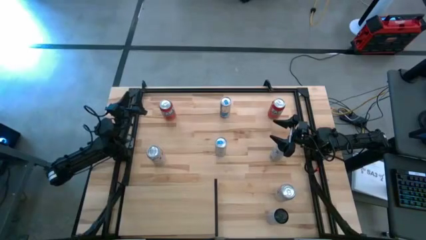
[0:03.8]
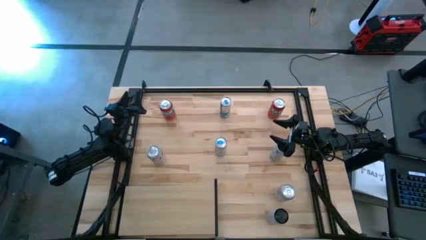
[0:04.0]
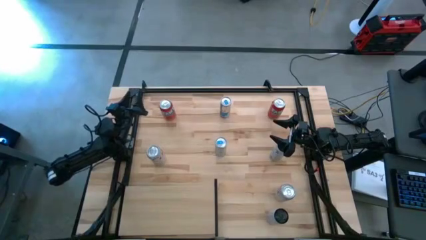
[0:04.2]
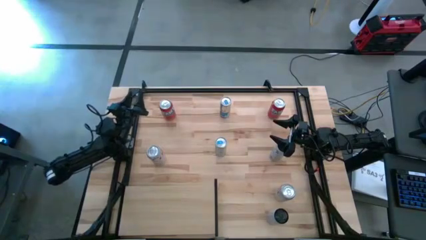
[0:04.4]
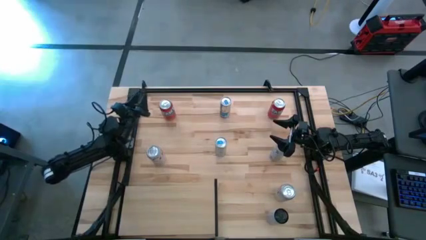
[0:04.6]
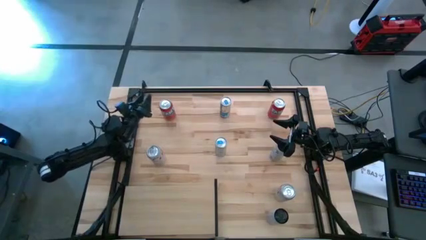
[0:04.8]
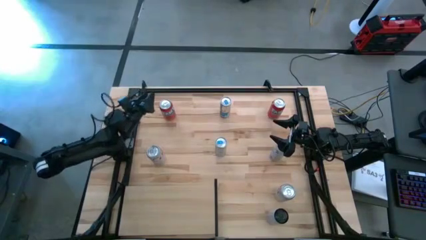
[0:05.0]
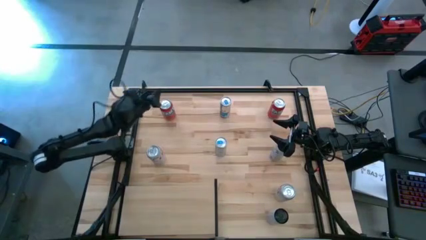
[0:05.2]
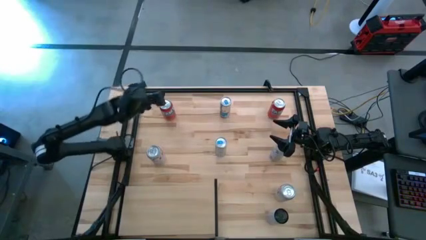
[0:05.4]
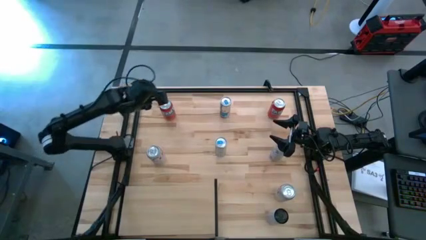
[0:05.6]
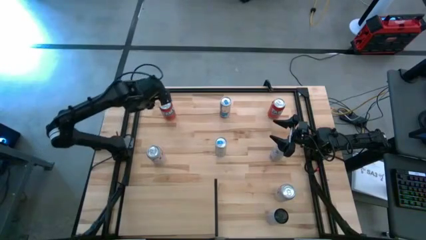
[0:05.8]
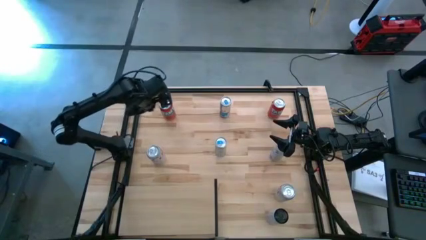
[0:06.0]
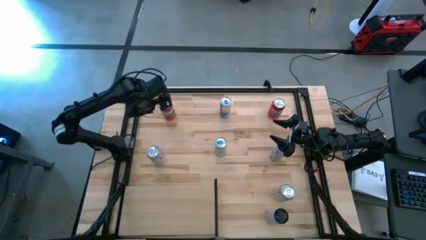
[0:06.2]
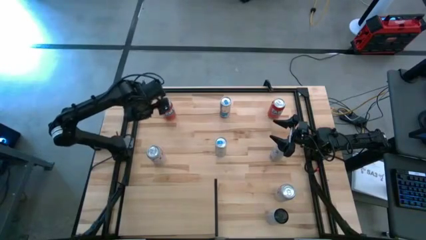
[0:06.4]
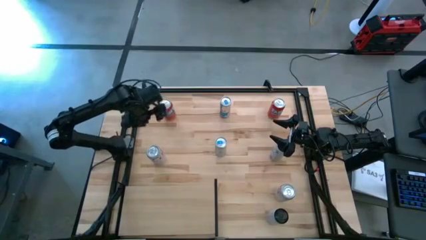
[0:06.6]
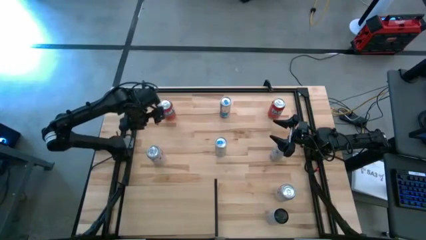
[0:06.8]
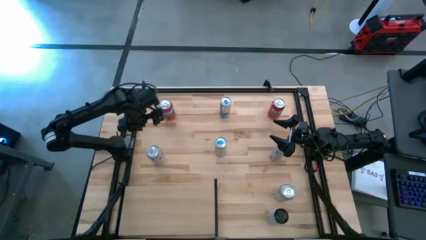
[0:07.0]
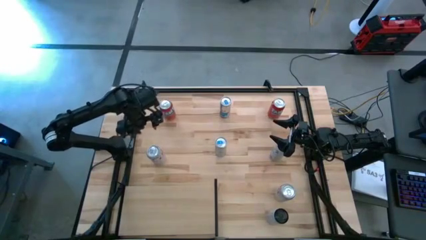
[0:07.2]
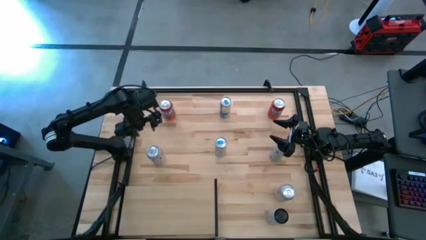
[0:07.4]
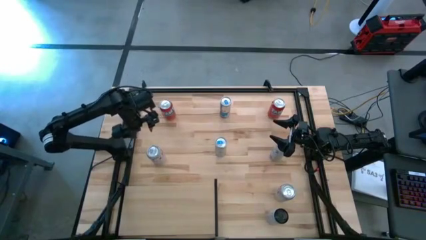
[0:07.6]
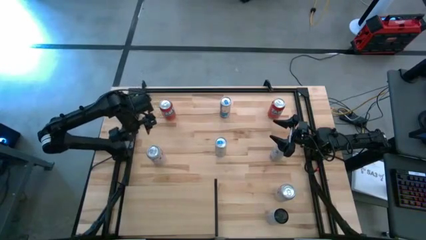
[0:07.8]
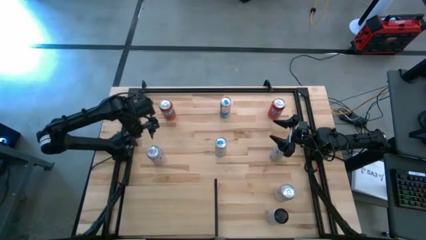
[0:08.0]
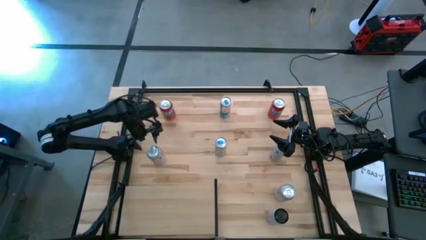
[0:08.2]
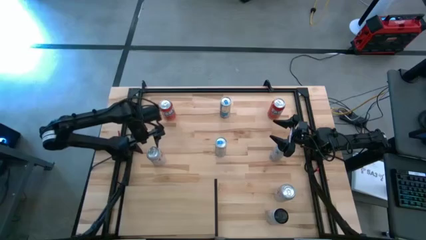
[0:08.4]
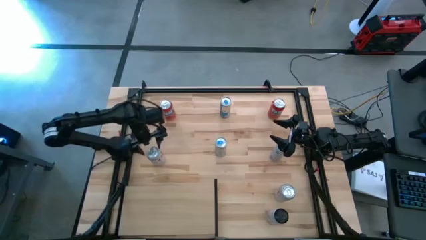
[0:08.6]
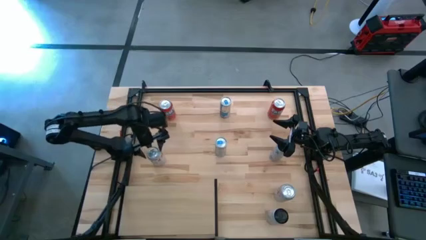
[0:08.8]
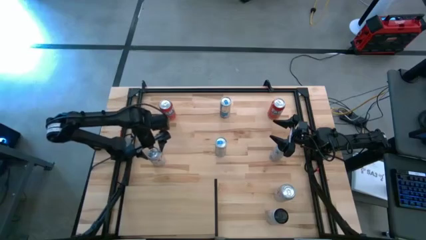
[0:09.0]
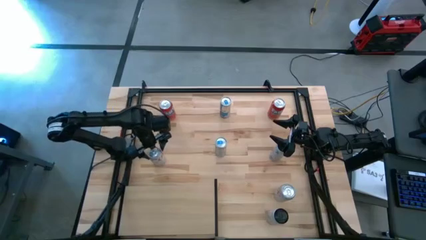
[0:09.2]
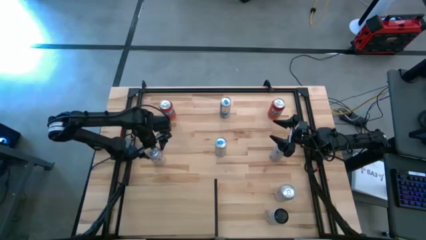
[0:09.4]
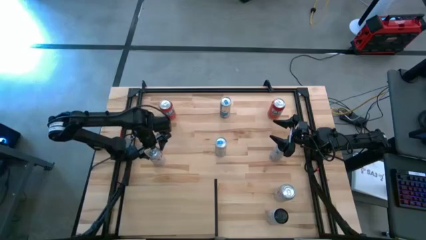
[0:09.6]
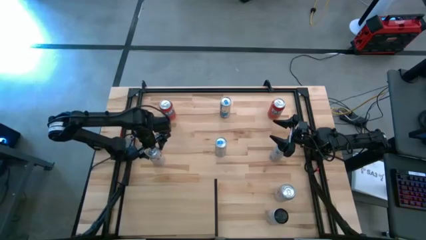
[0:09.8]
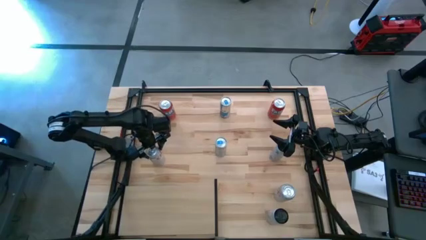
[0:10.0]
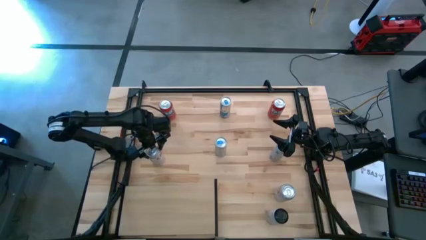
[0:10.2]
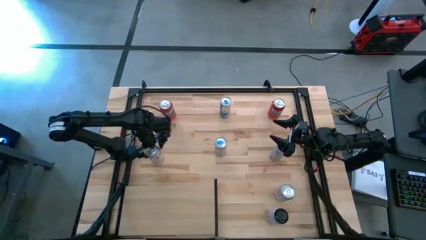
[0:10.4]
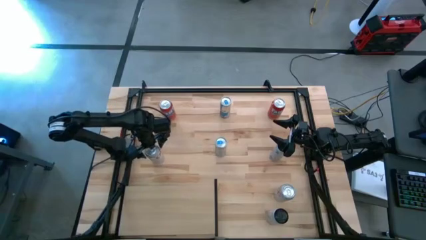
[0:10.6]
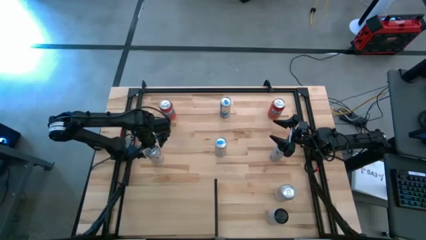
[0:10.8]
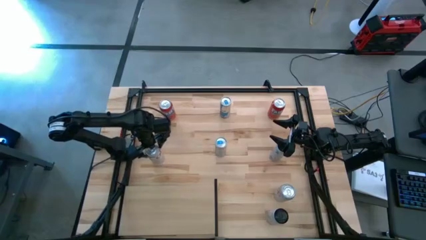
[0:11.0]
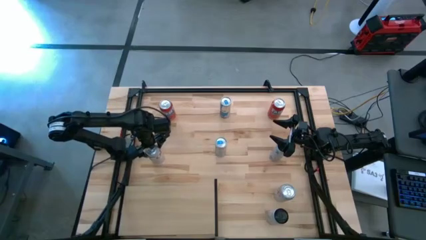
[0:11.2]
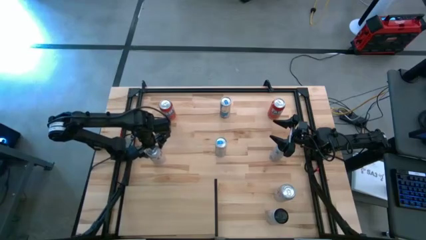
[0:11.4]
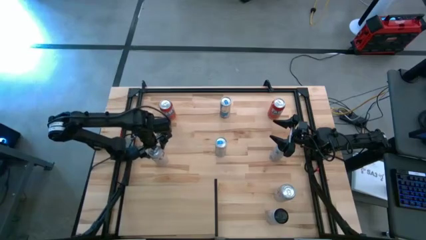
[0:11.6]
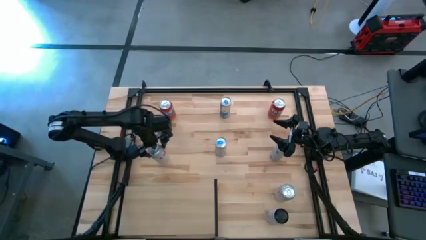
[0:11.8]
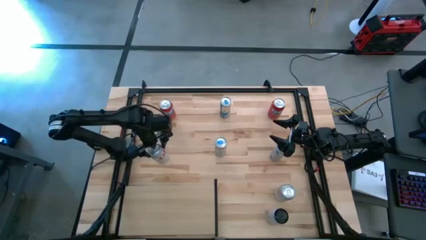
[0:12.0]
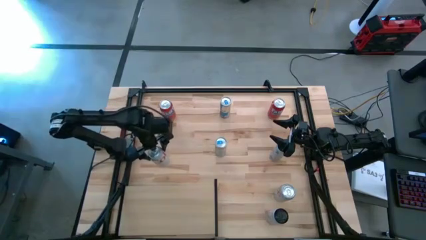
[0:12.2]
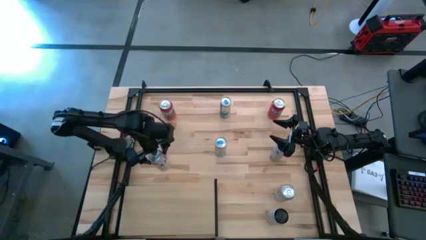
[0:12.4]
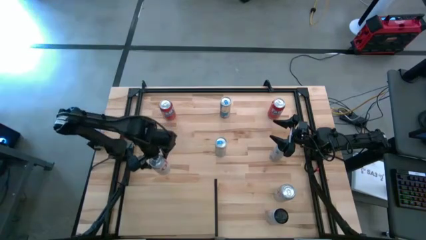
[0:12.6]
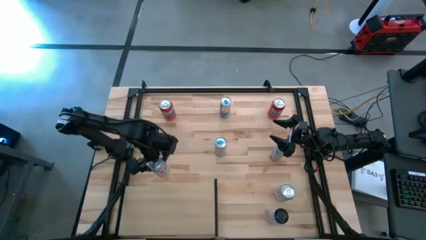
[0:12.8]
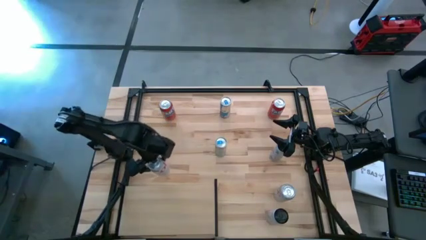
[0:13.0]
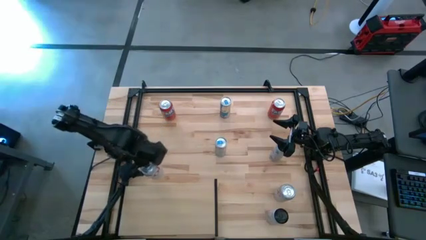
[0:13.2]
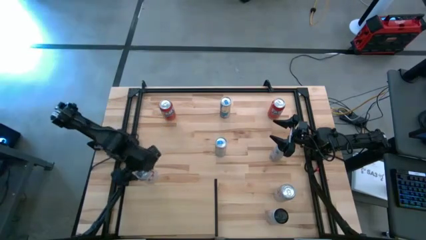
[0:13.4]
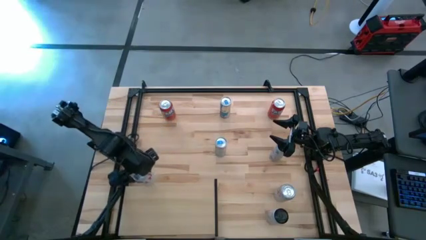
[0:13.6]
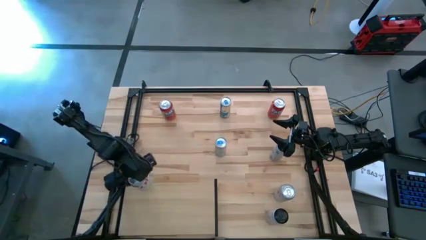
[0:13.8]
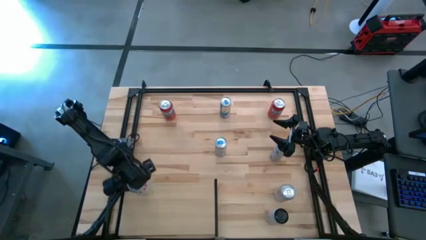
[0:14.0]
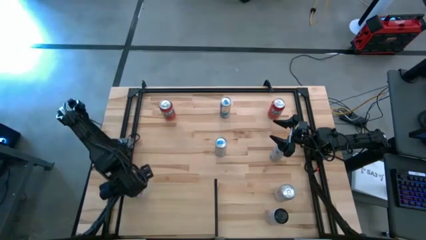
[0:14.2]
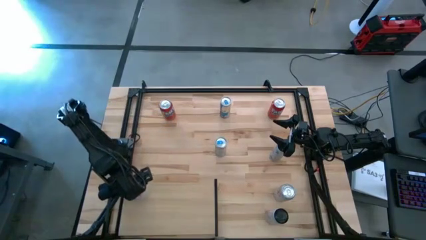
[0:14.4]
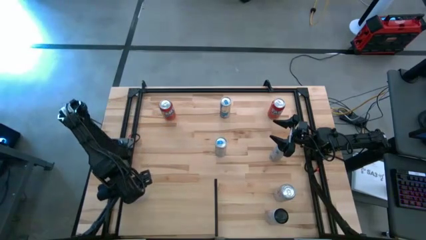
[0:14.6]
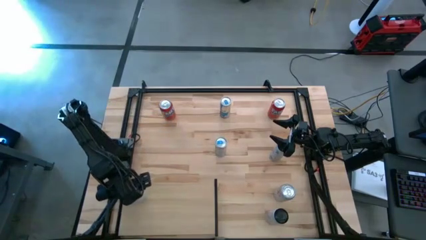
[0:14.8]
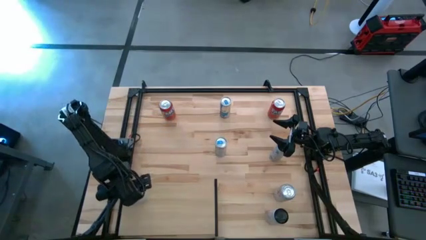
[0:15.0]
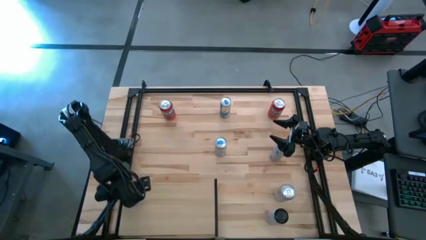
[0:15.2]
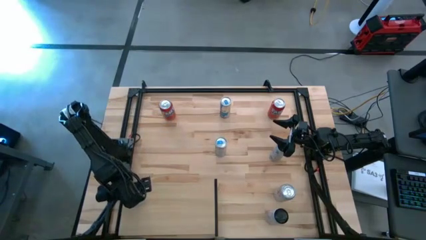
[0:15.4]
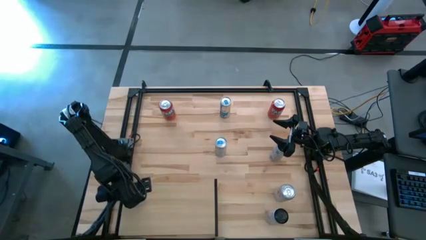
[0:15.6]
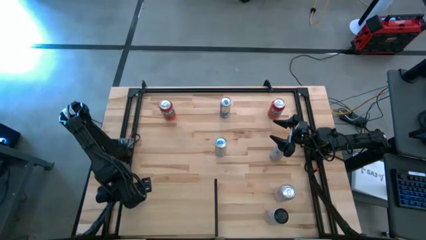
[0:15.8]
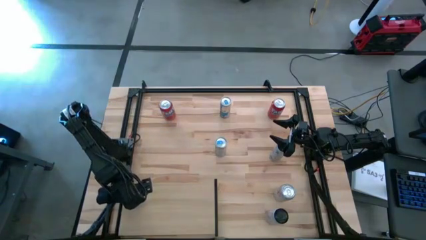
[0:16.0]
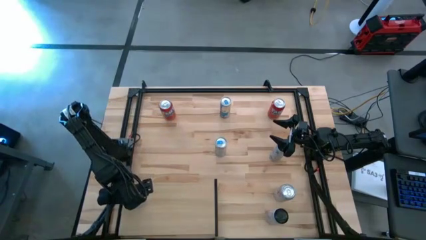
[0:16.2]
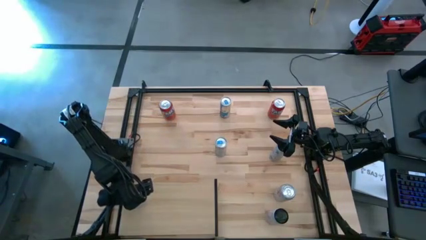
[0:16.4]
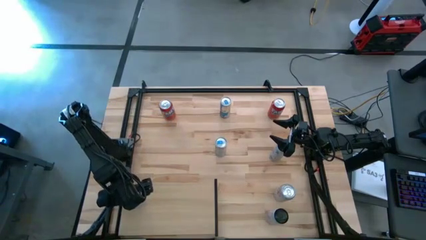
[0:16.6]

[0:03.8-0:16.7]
Task: Place canned beverage on shelf
Put the left red silver soda can on the shelf
